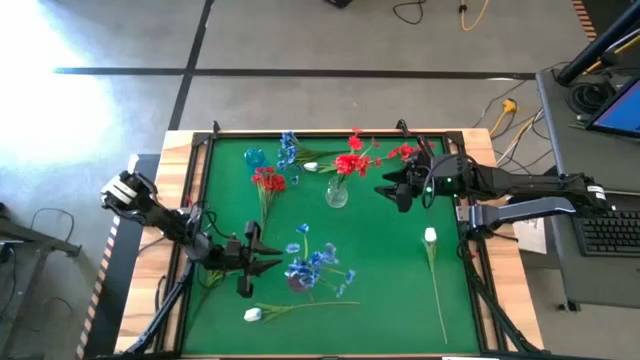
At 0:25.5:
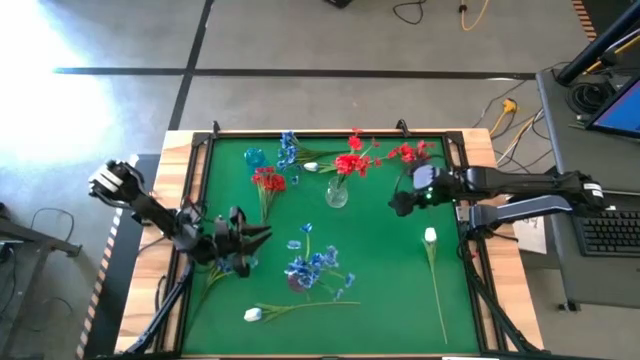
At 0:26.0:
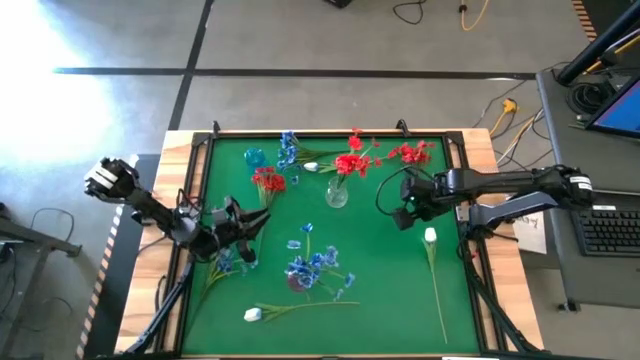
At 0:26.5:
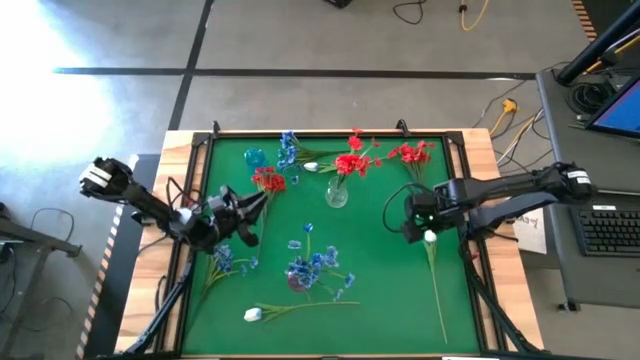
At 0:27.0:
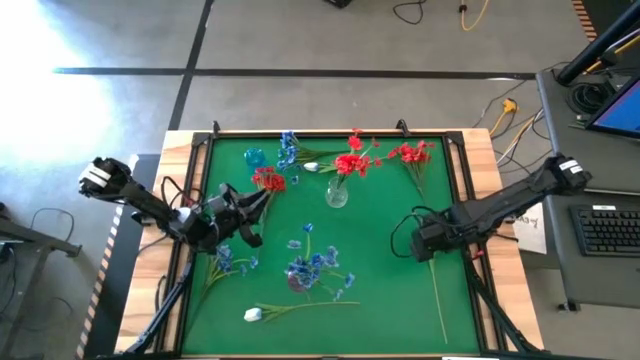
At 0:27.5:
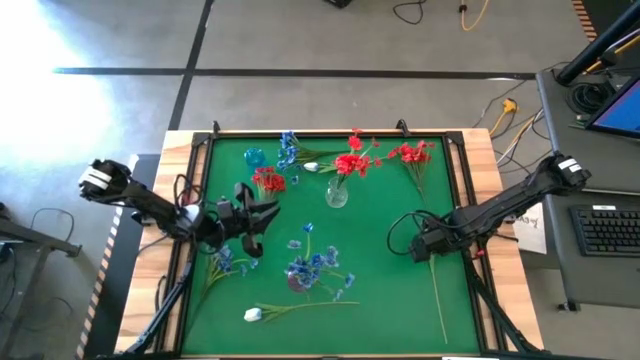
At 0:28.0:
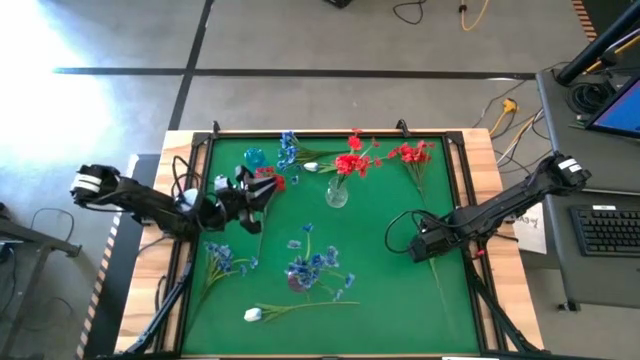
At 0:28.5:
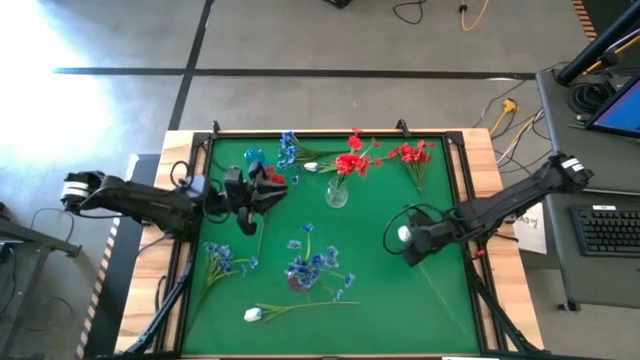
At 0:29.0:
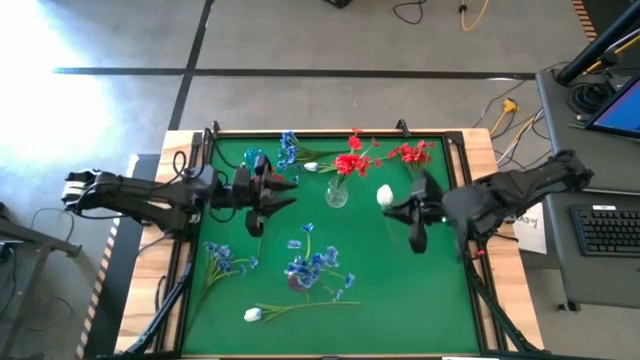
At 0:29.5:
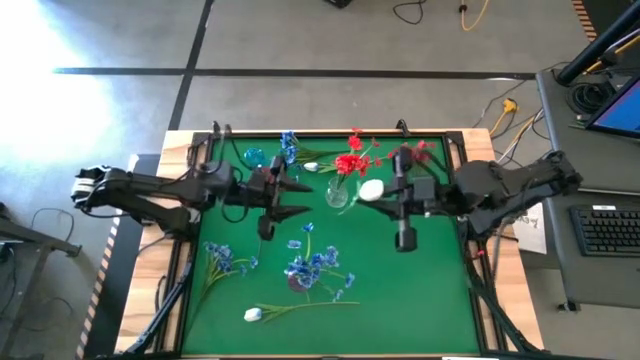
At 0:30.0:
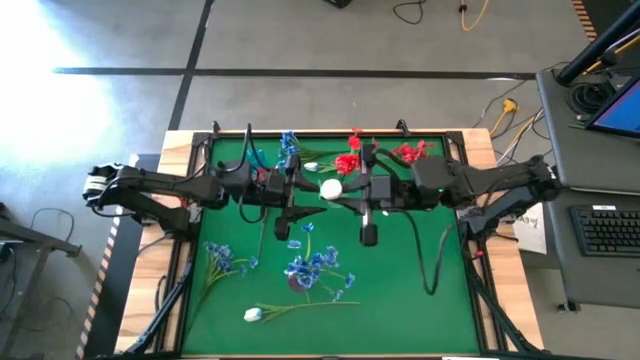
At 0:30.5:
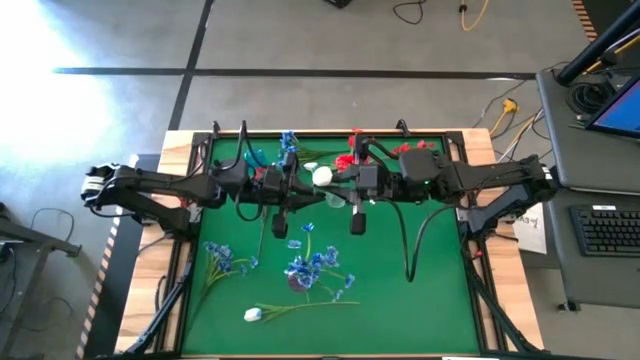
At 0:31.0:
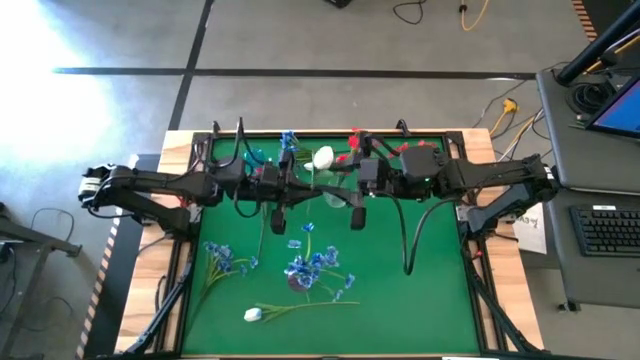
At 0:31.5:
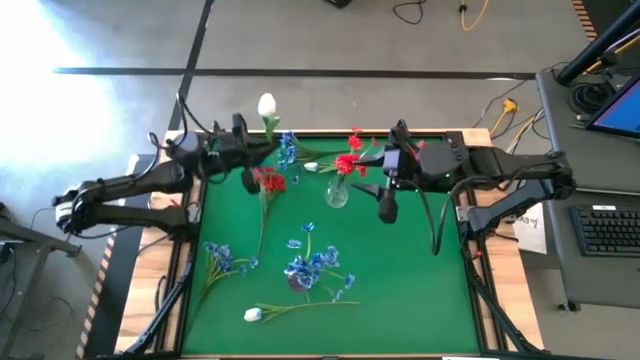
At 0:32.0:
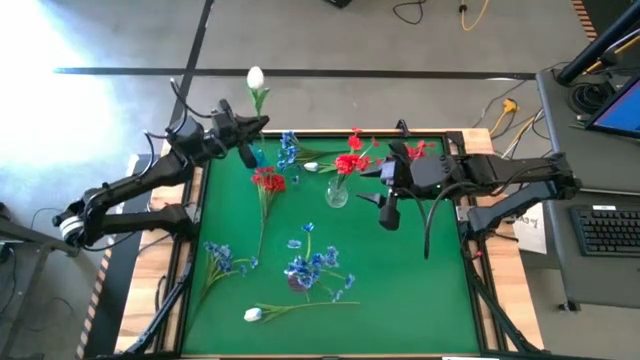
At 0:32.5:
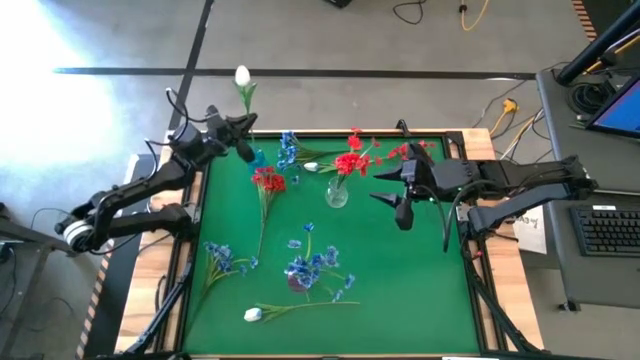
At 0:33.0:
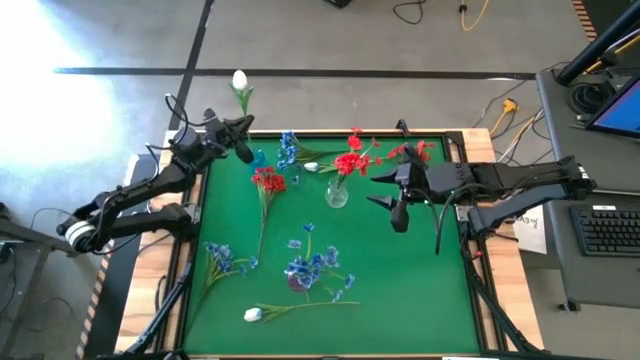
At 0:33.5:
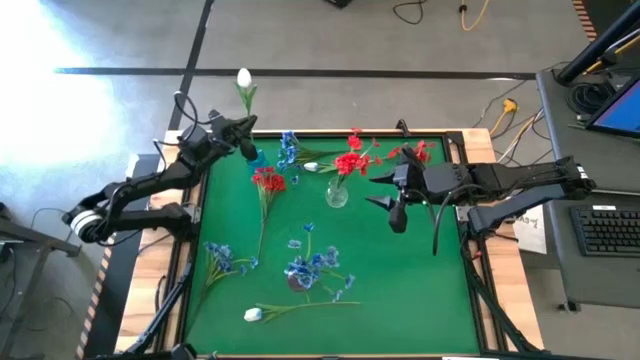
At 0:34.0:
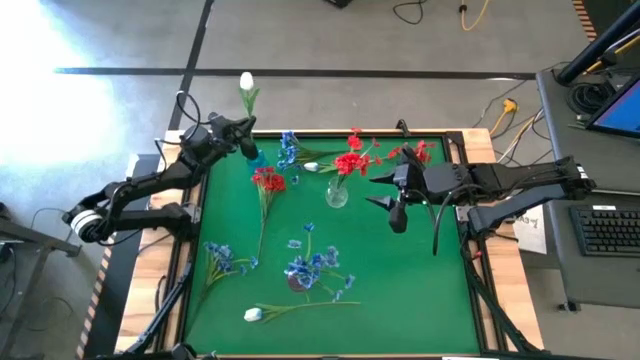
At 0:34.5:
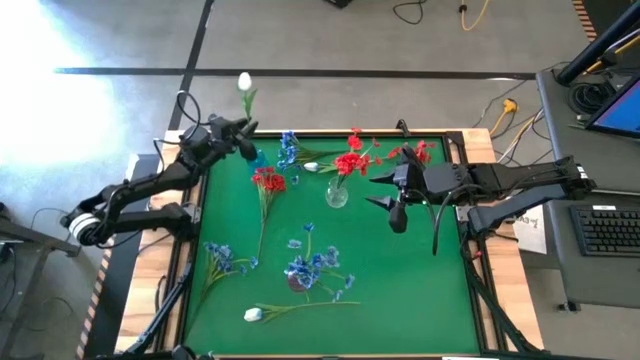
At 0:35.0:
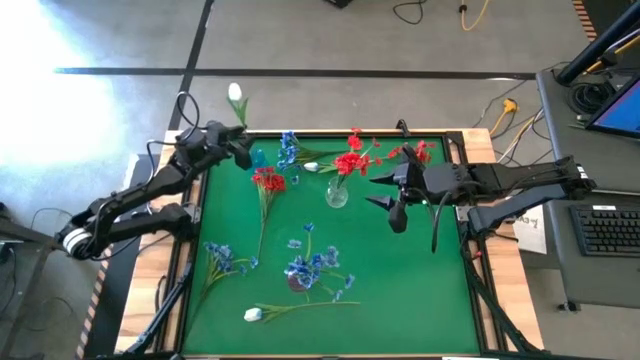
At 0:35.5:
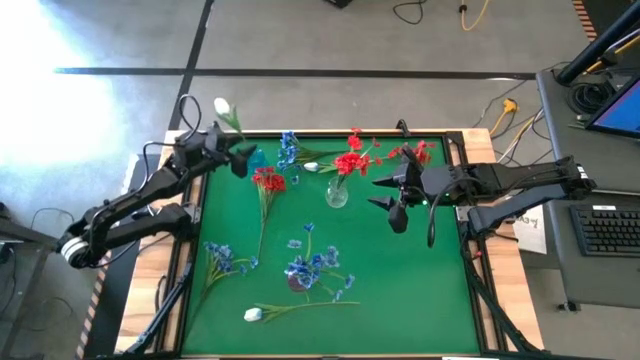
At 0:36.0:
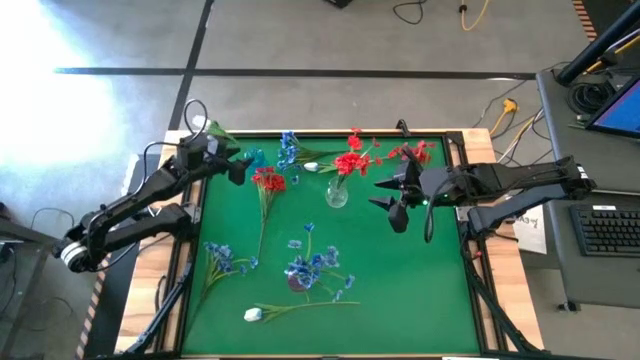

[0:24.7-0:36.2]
Task: Sort flowers into vase by color
Put the bottom right white flower into the blue vase

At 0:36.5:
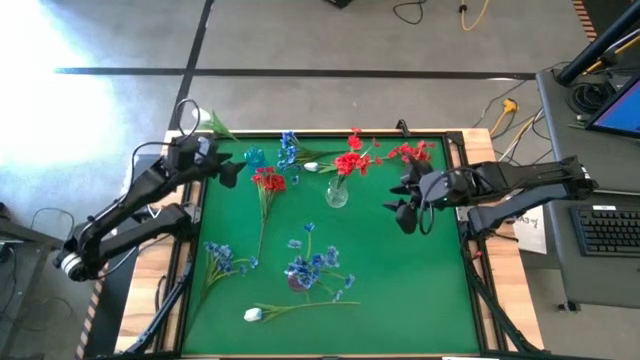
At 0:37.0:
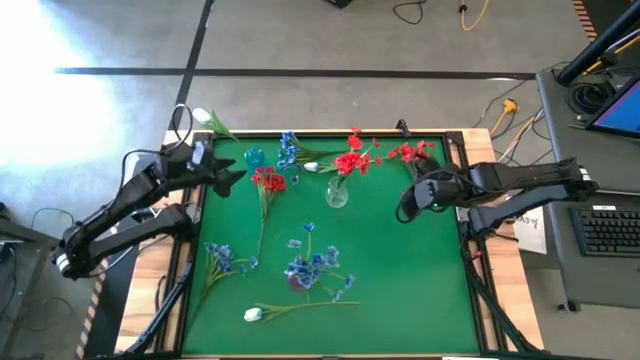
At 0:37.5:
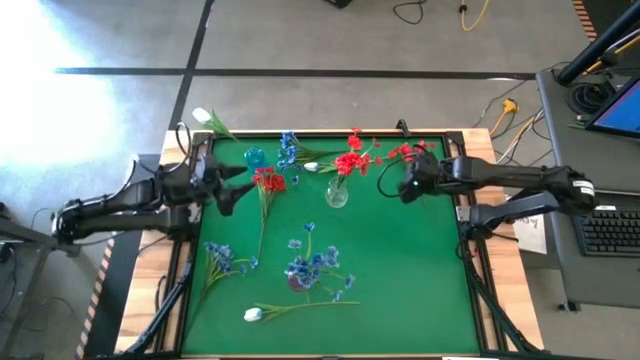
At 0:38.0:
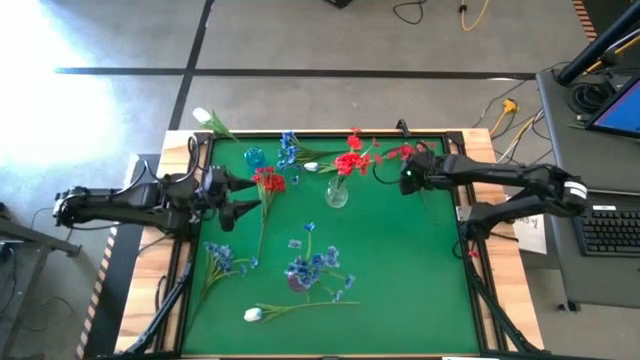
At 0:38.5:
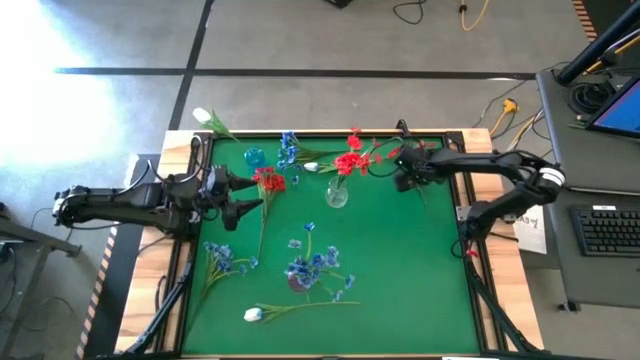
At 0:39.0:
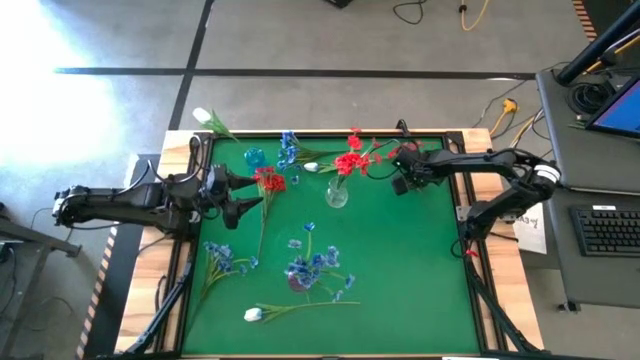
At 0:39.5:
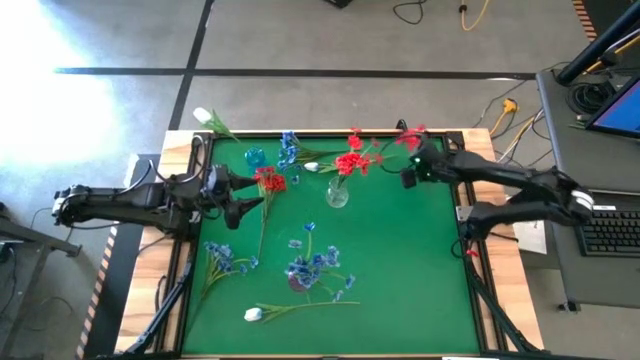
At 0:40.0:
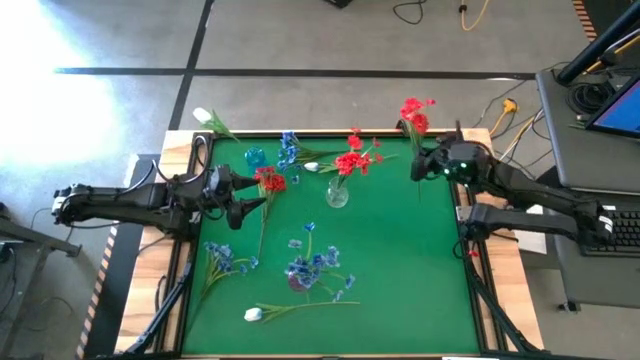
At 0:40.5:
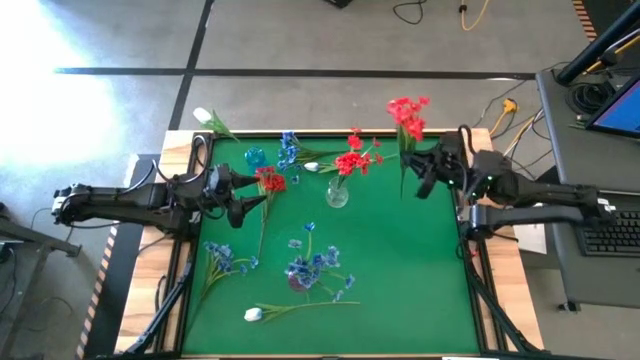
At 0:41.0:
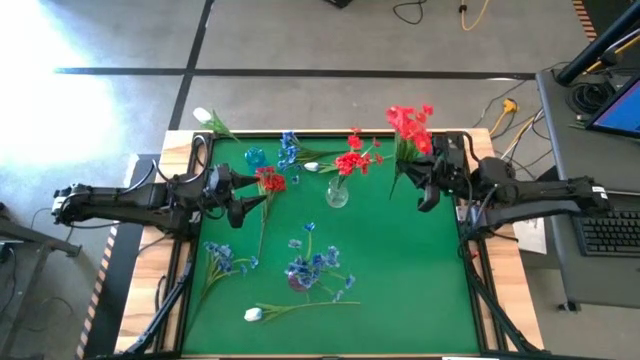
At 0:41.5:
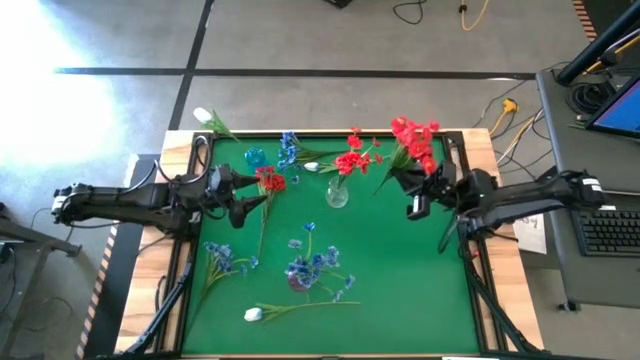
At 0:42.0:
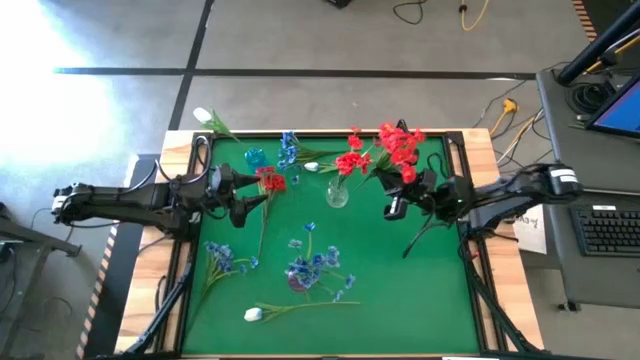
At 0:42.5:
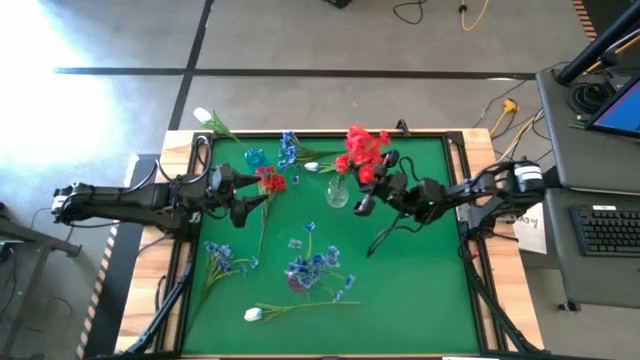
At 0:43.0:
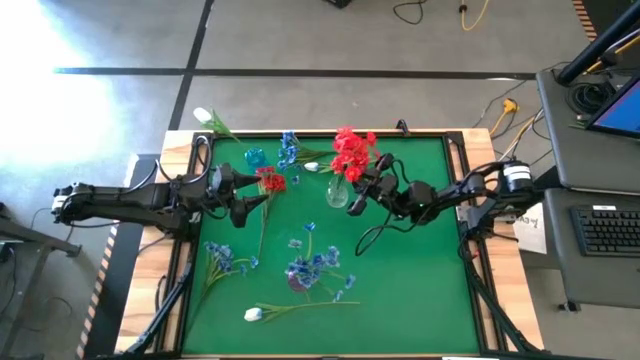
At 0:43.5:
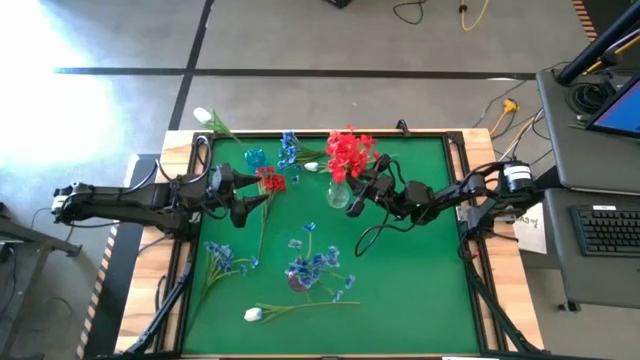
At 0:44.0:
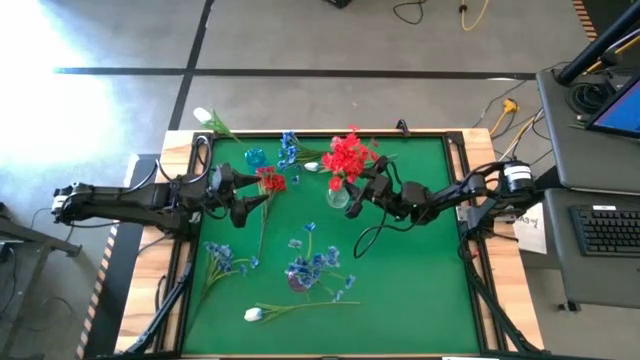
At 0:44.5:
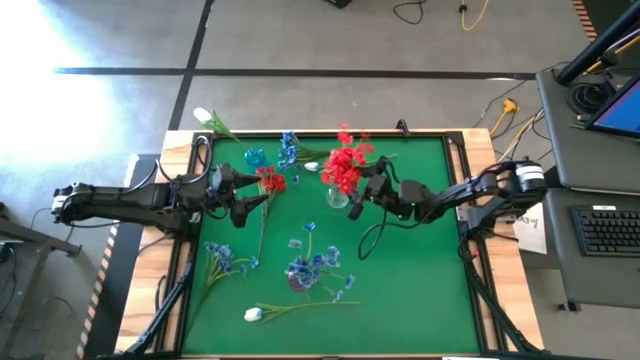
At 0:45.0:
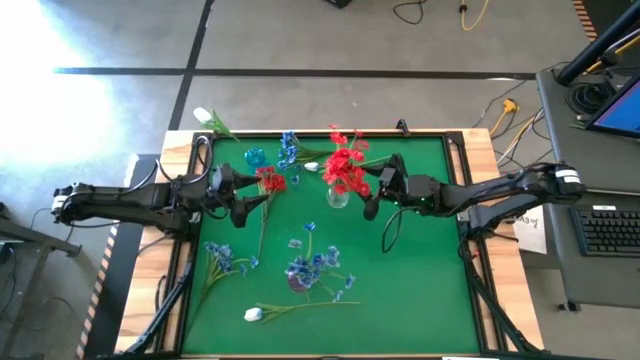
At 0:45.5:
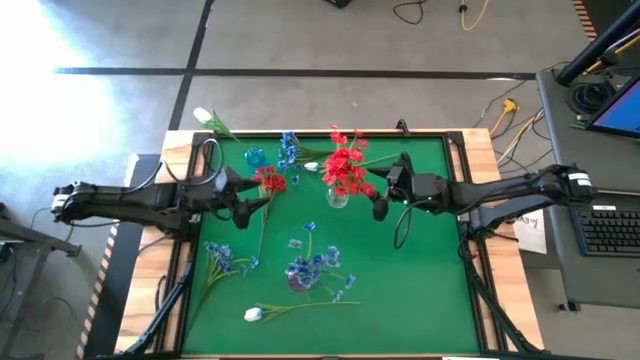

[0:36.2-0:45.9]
Put the right red flowers into the transparent vase
